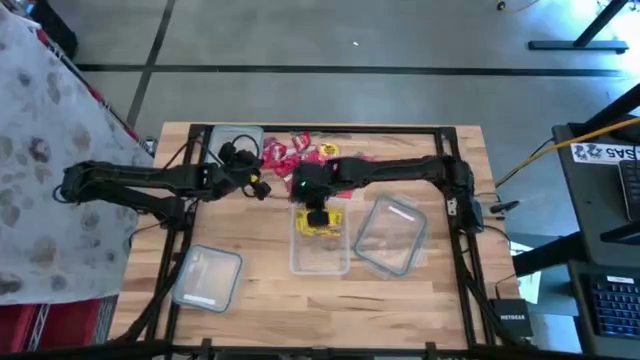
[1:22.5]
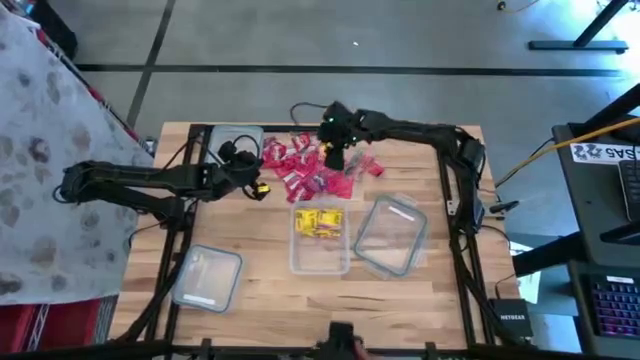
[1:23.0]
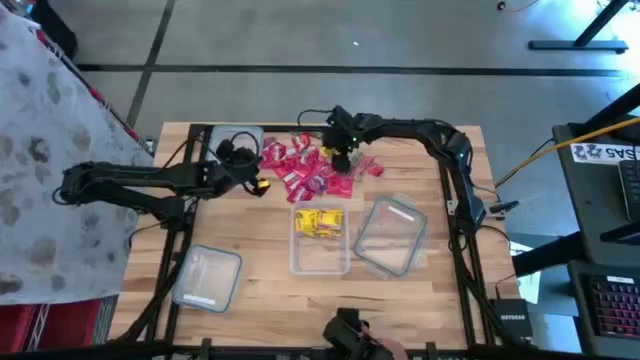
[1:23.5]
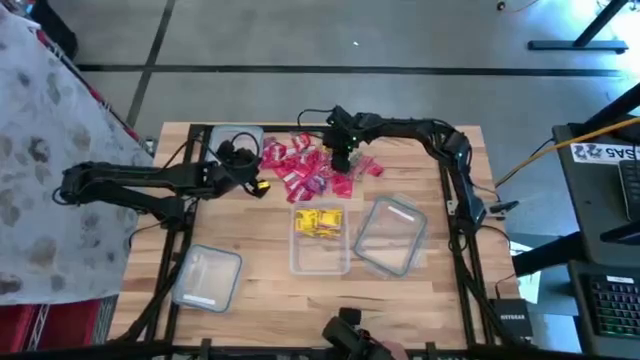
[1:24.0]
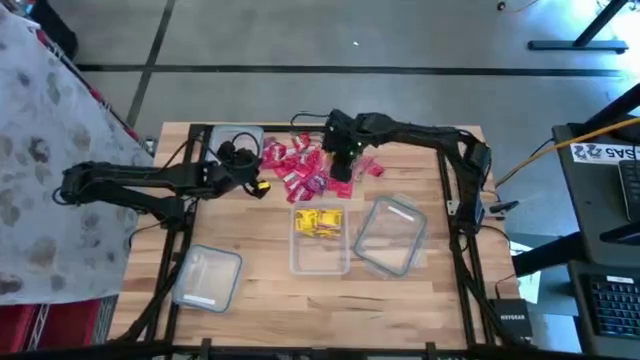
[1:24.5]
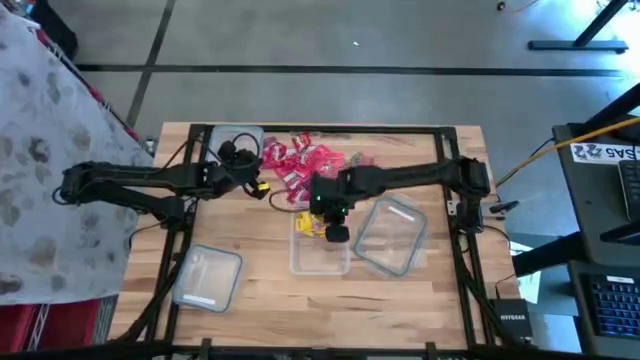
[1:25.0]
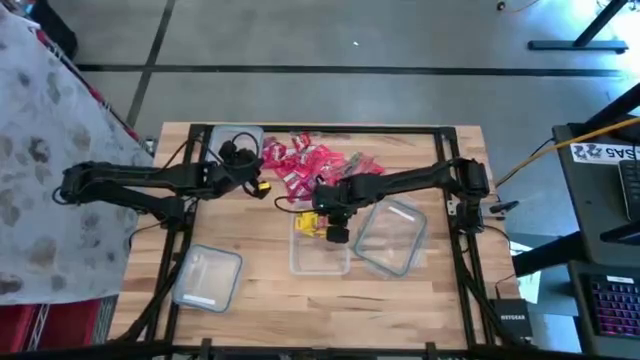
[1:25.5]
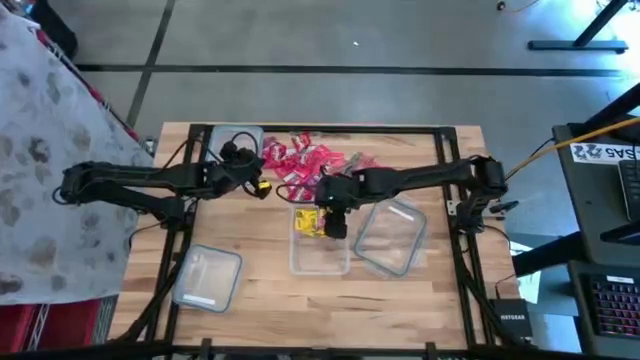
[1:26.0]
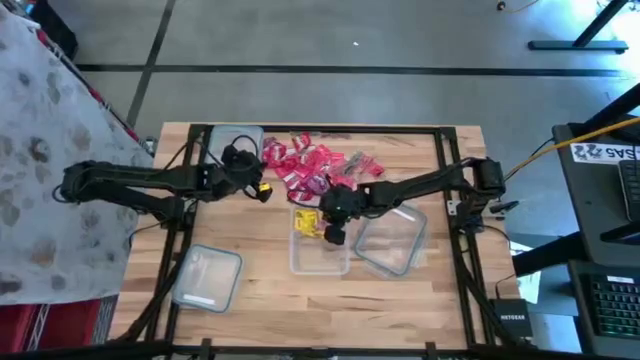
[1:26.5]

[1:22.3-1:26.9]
Task: Sort candy
Put the yellow candy into the right transparent bin

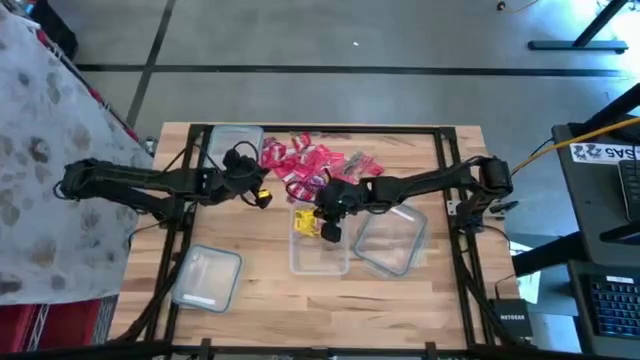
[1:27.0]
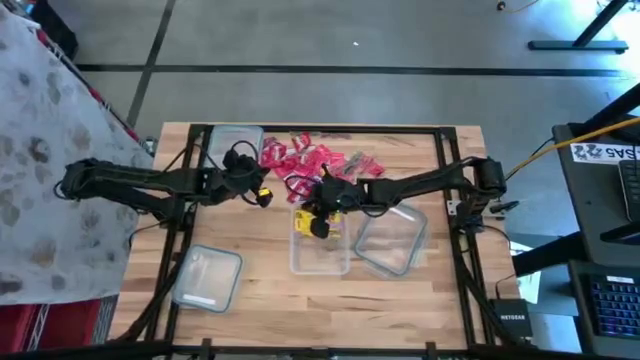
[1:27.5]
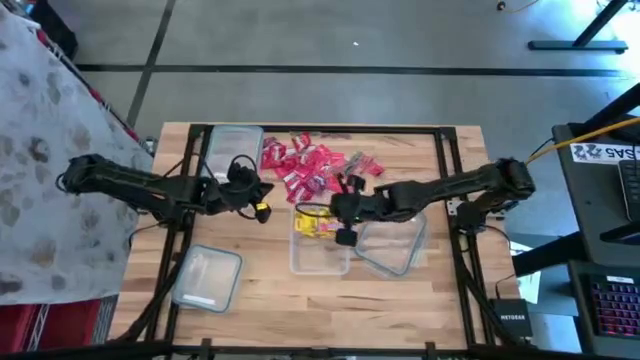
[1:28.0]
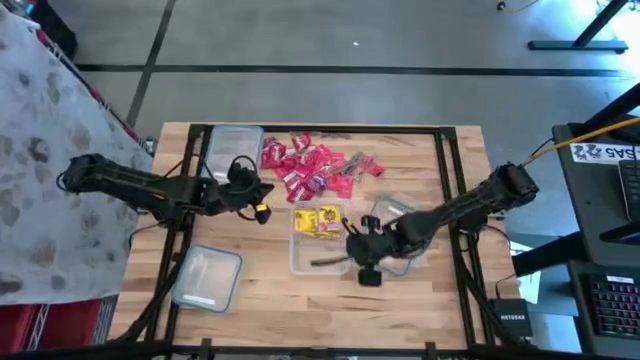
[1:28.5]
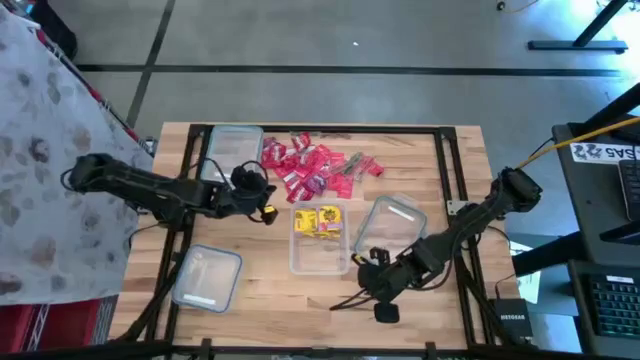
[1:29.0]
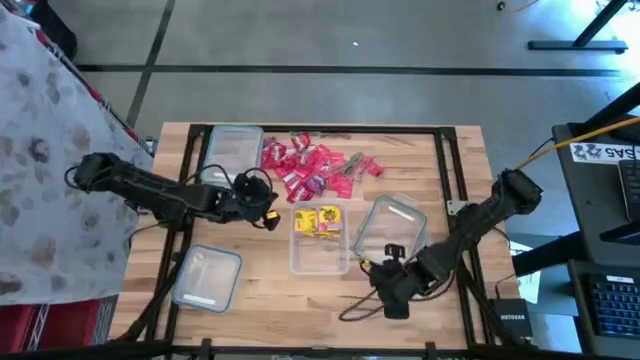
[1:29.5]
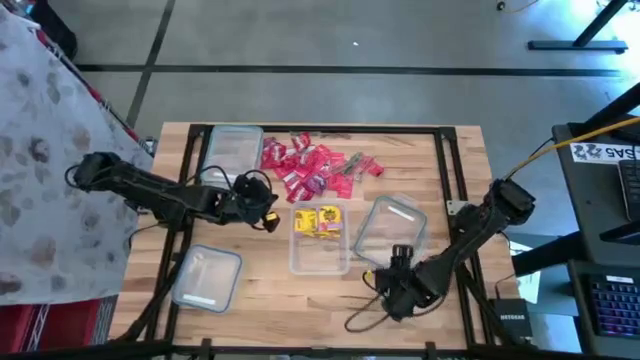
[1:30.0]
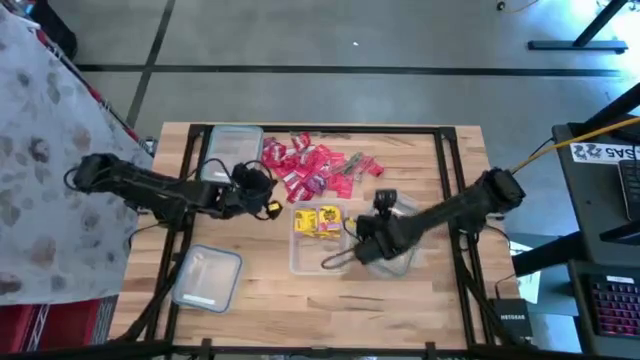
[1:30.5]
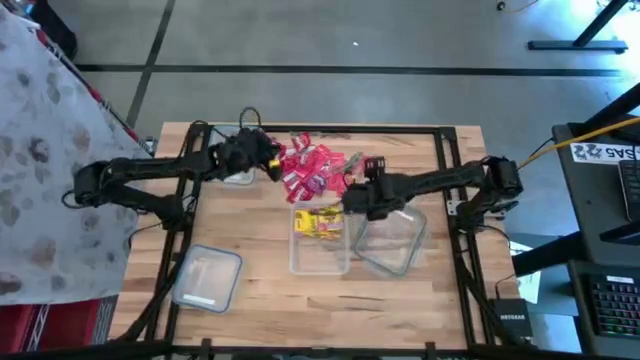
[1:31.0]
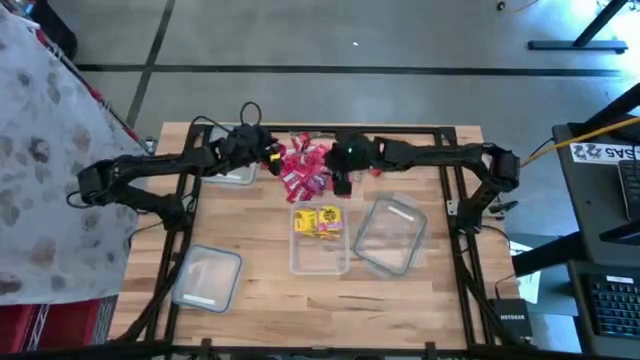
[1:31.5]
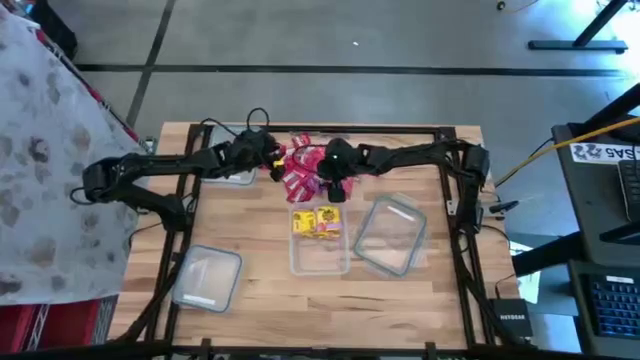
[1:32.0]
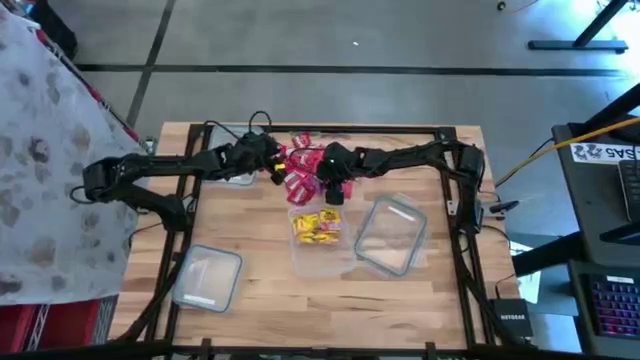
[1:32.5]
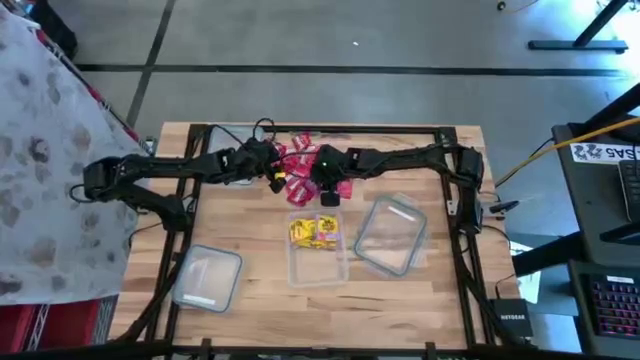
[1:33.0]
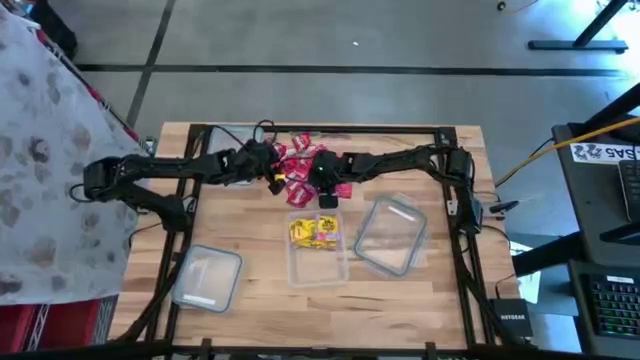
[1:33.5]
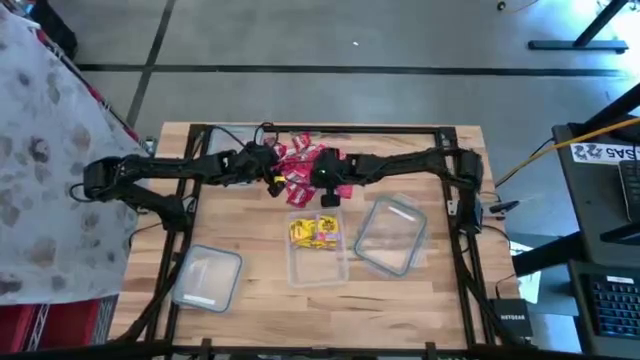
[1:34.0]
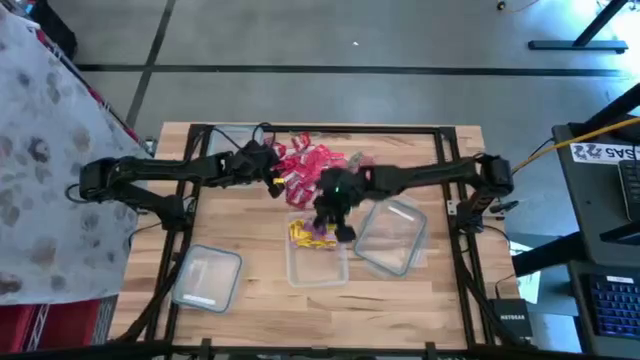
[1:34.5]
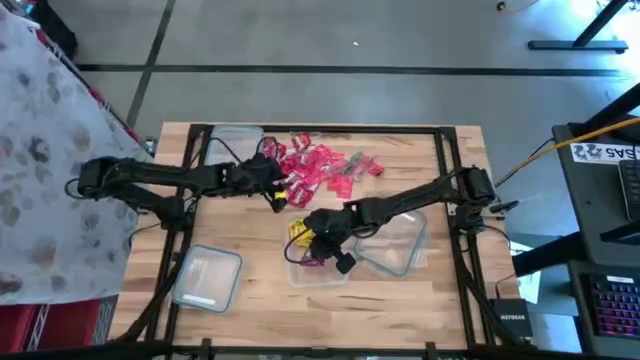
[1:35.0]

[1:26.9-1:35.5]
Put the violet candy into the right transparent bin

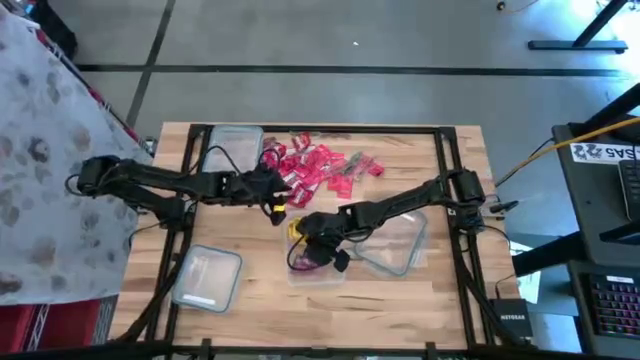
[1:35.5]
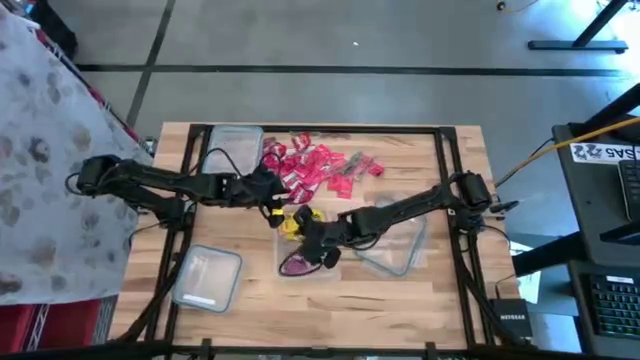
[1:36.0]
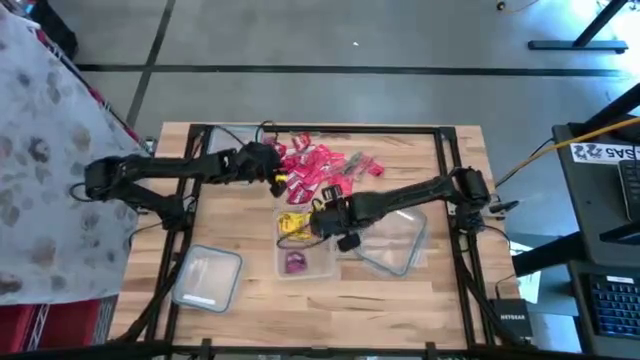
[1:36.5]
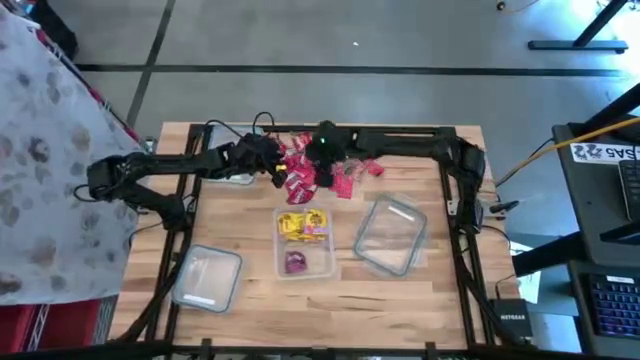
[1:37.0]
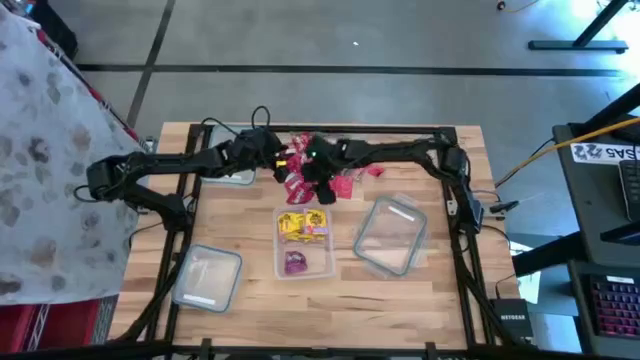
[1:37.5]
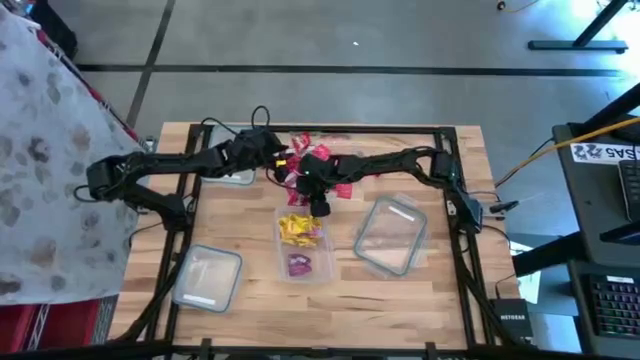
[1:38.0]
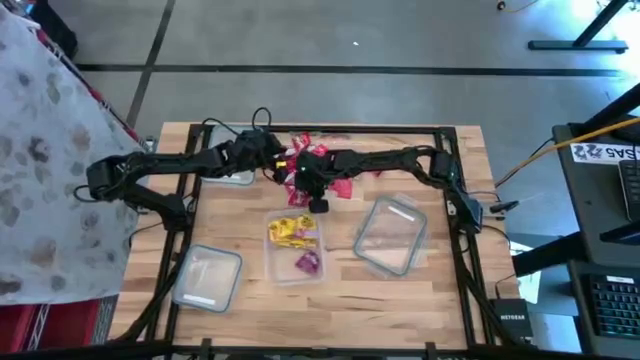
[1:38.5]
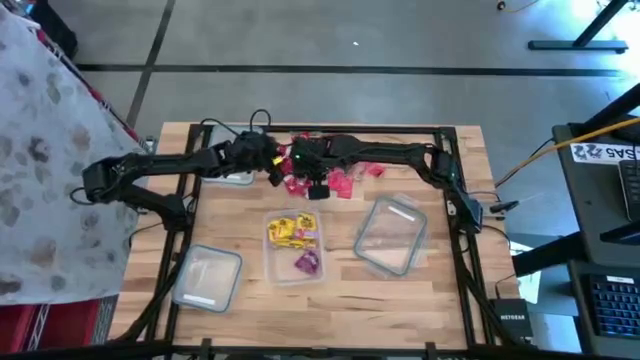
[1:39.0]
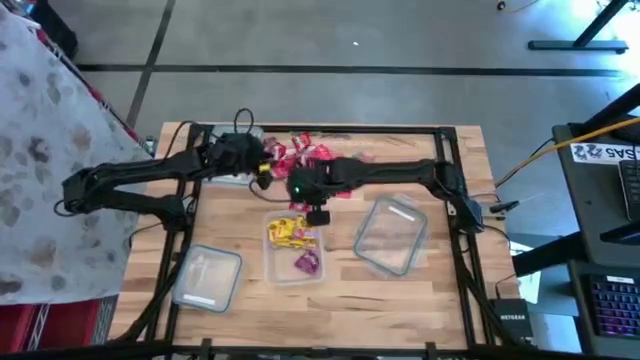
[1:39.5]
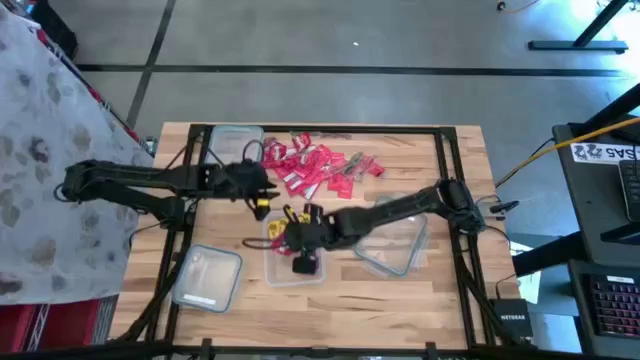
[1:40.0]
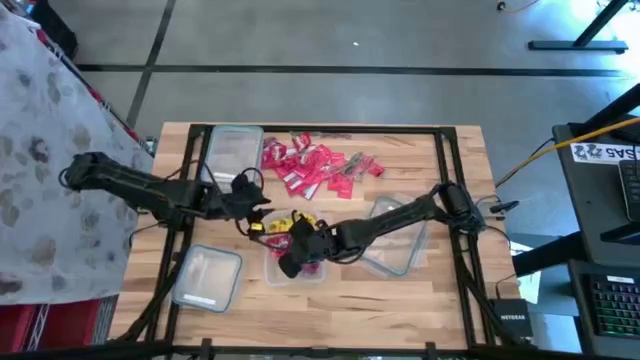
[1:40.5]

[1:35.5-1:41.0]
Put the red candy into the right transparent bin

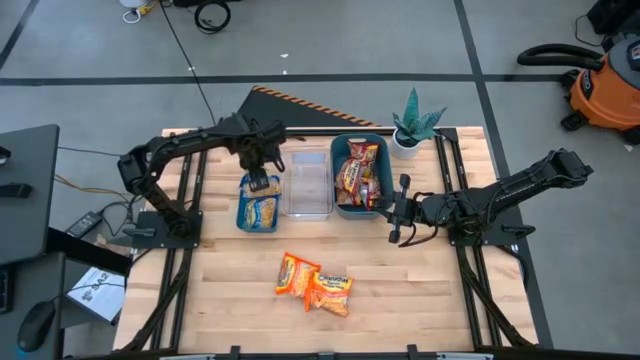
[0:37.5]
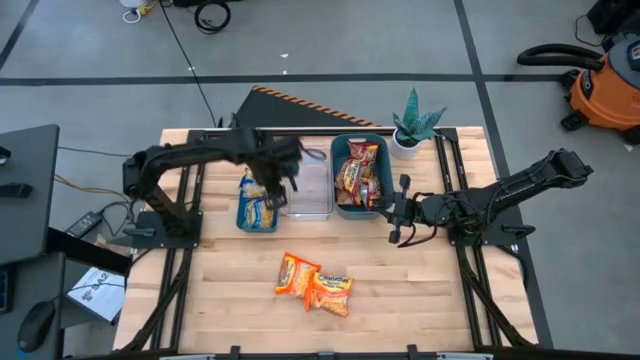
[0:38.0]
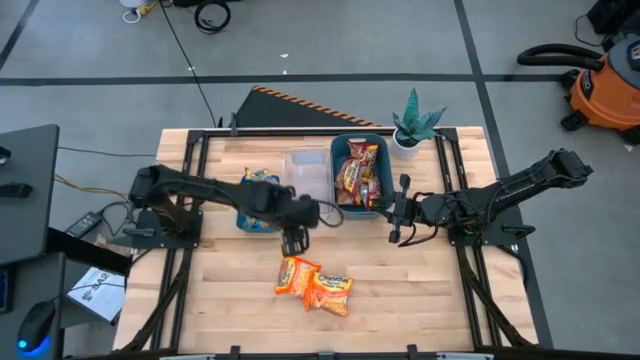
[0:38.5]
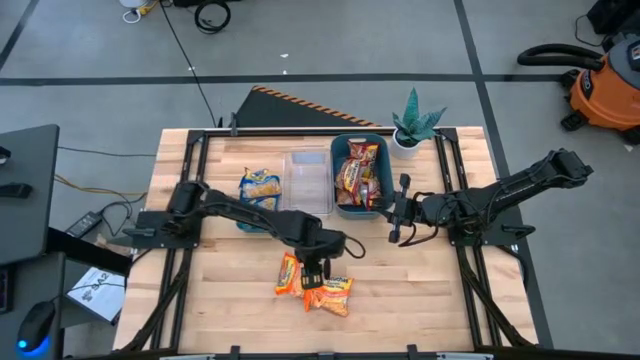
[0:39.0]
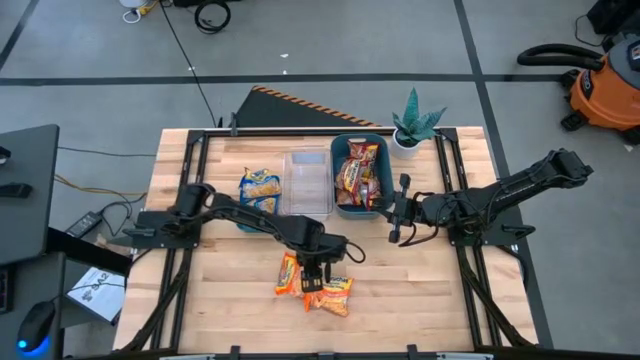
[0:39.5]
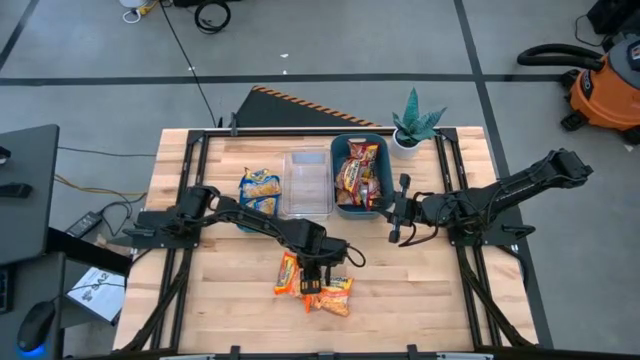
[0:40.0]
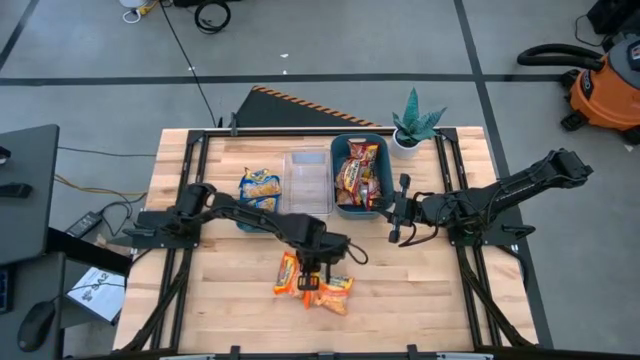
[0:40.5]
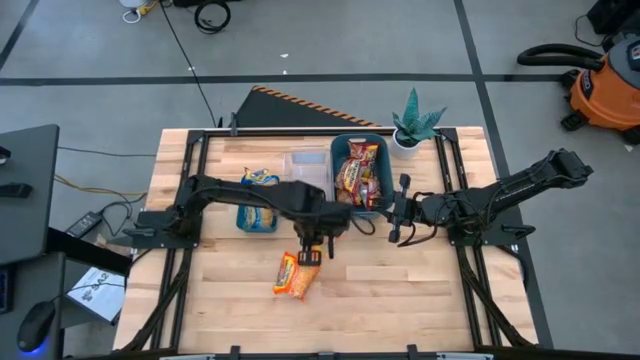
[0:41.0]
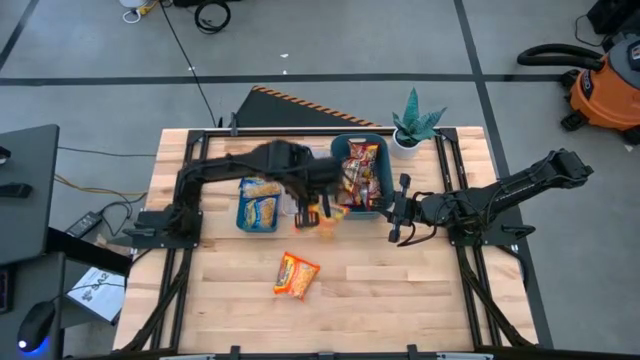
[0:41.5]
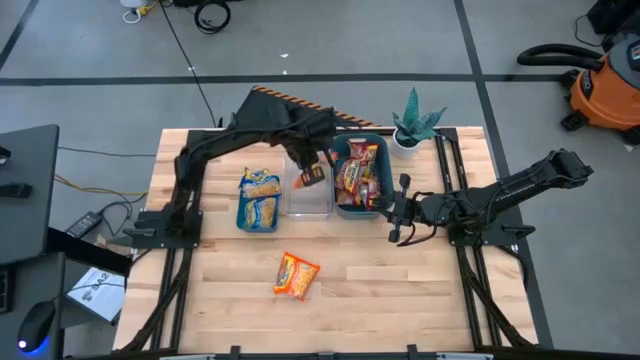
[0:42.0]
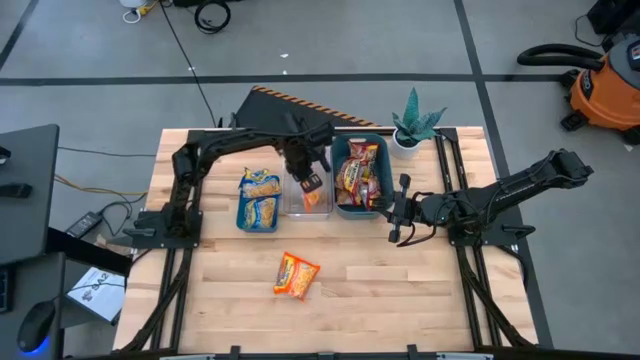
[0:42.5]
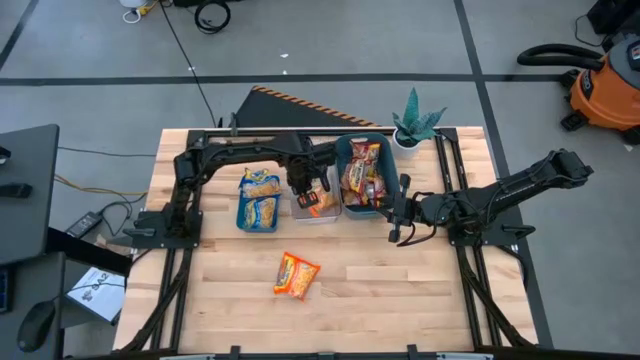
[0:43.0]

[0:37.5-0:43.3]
Task: Sort Maruchan noodles
Put the orange noodle pack into the transparent bin
